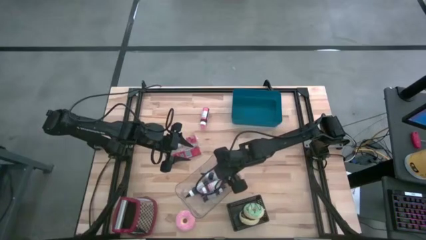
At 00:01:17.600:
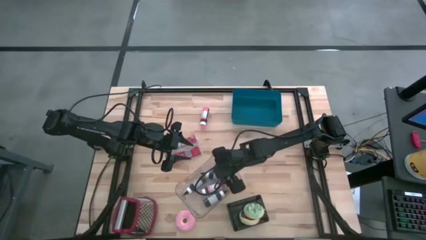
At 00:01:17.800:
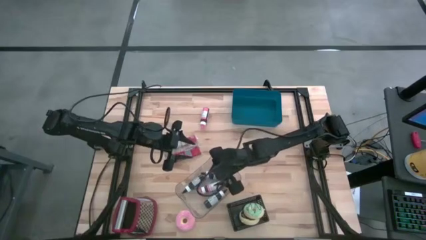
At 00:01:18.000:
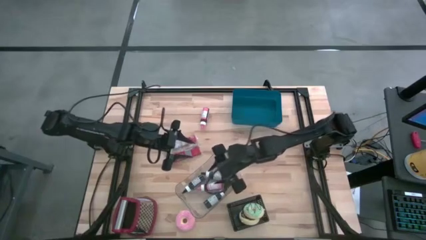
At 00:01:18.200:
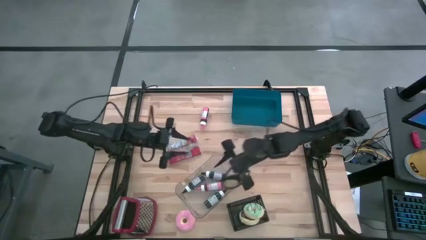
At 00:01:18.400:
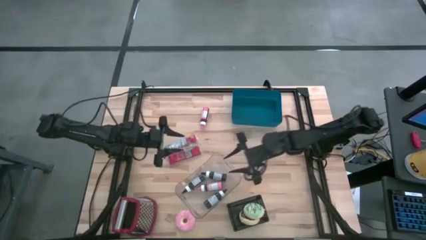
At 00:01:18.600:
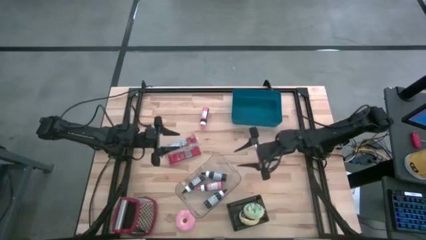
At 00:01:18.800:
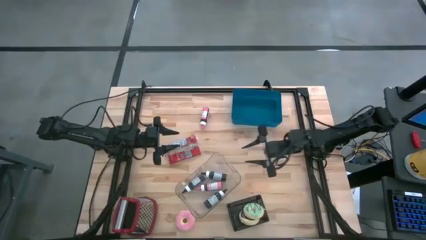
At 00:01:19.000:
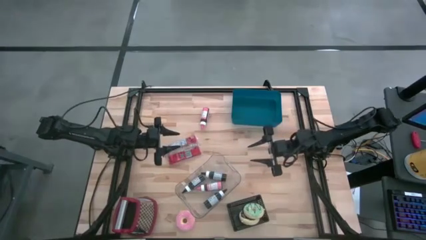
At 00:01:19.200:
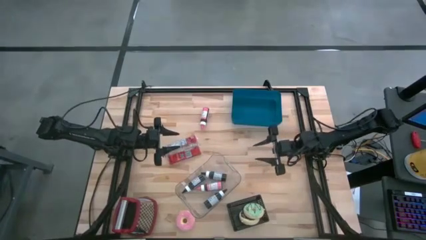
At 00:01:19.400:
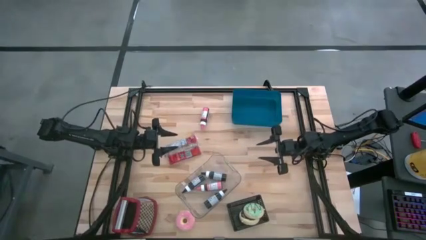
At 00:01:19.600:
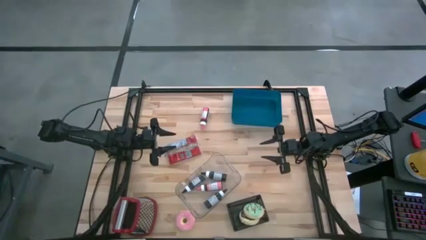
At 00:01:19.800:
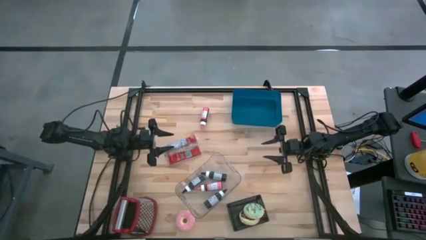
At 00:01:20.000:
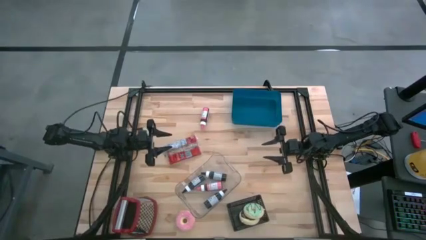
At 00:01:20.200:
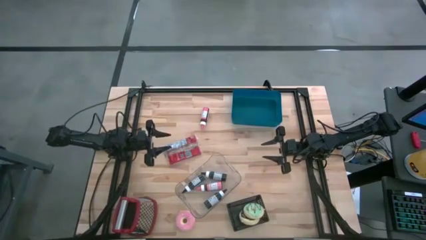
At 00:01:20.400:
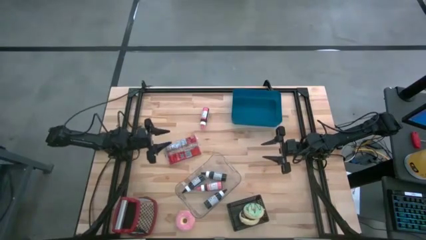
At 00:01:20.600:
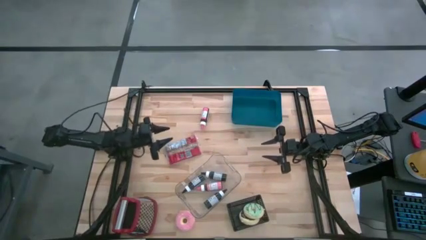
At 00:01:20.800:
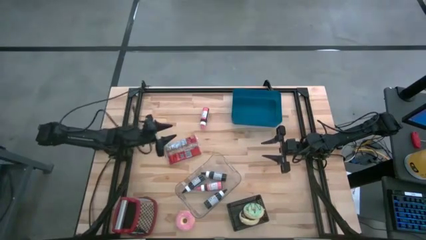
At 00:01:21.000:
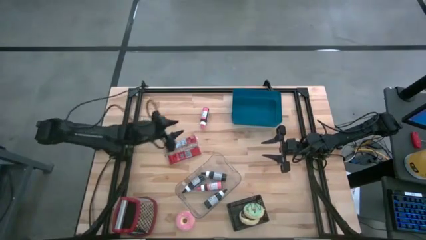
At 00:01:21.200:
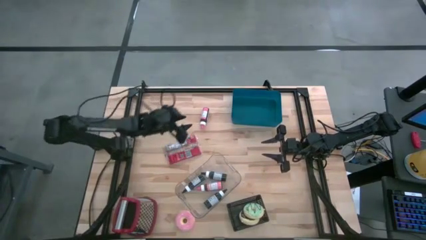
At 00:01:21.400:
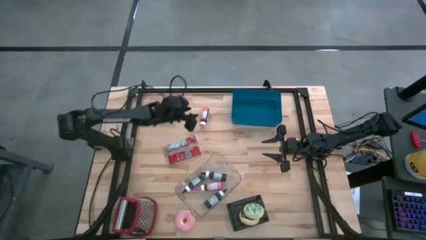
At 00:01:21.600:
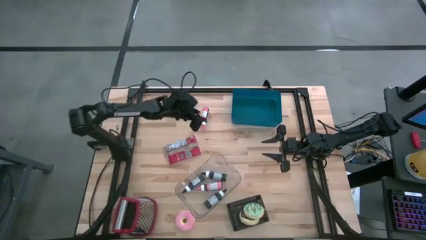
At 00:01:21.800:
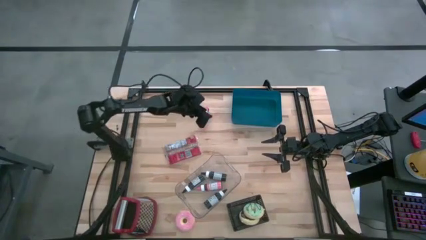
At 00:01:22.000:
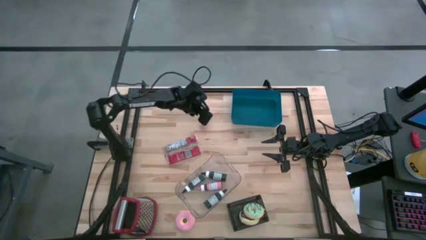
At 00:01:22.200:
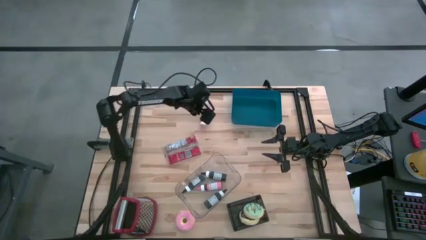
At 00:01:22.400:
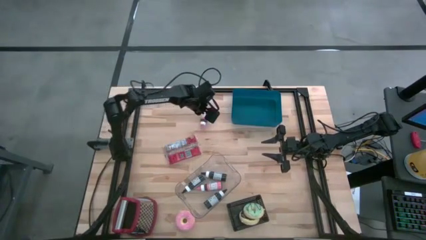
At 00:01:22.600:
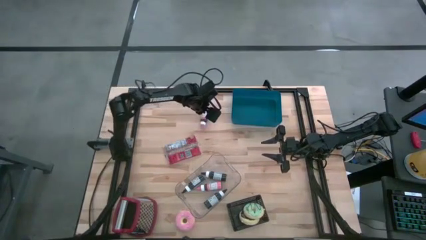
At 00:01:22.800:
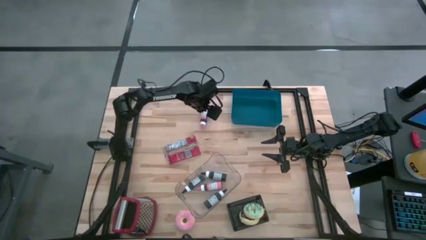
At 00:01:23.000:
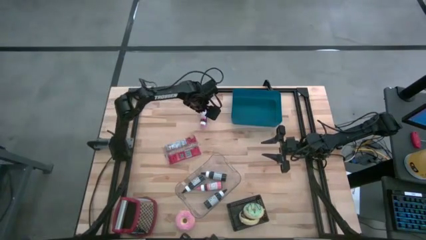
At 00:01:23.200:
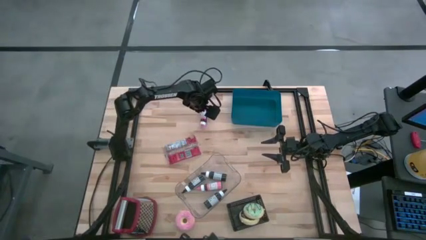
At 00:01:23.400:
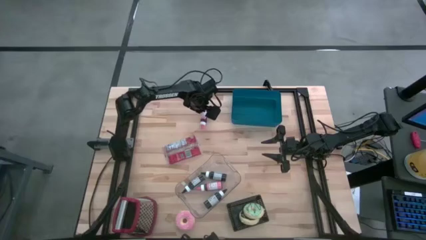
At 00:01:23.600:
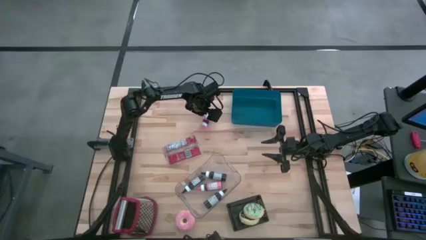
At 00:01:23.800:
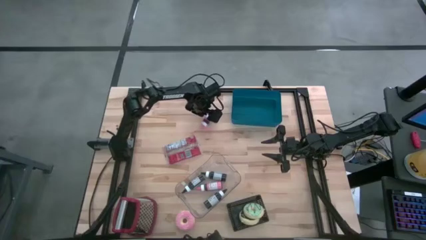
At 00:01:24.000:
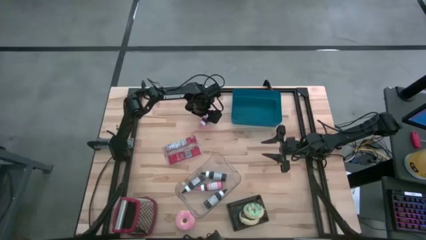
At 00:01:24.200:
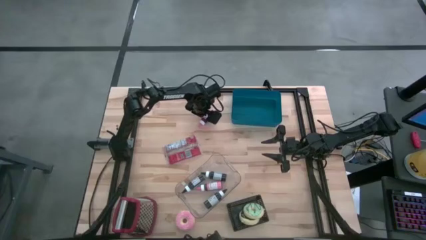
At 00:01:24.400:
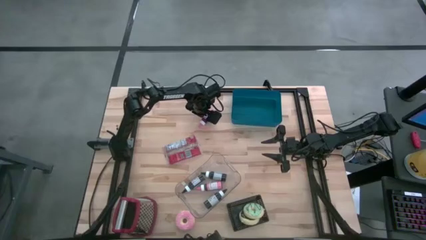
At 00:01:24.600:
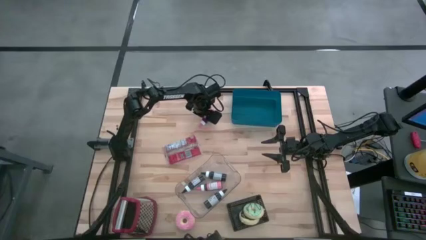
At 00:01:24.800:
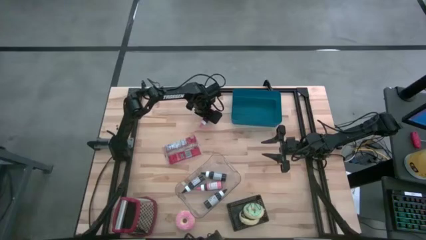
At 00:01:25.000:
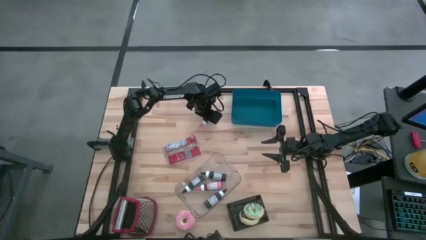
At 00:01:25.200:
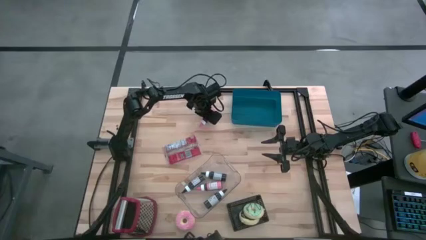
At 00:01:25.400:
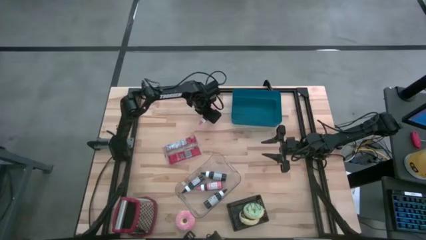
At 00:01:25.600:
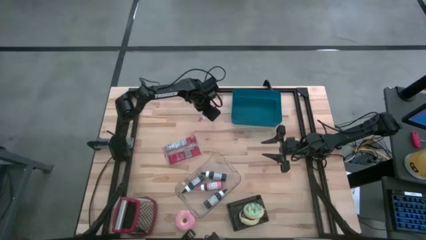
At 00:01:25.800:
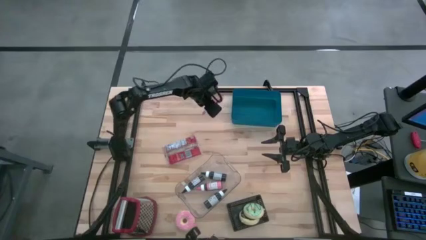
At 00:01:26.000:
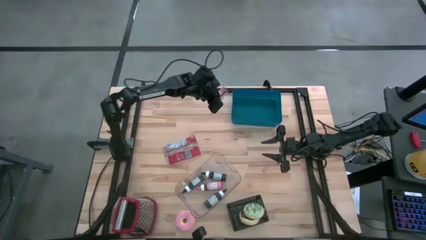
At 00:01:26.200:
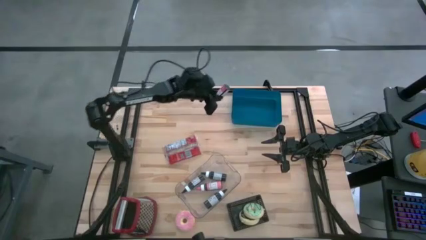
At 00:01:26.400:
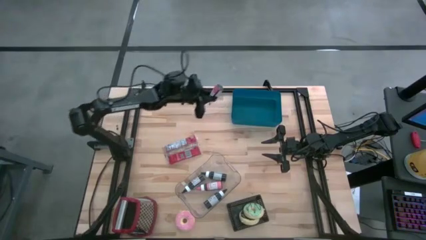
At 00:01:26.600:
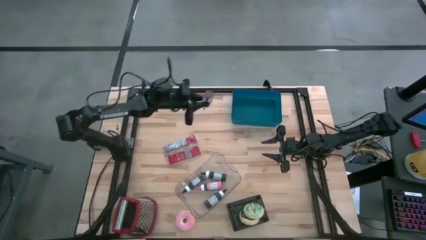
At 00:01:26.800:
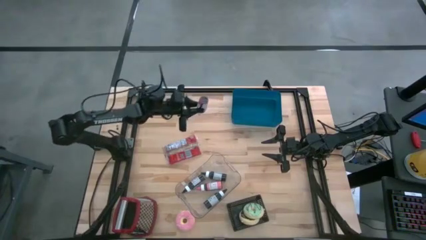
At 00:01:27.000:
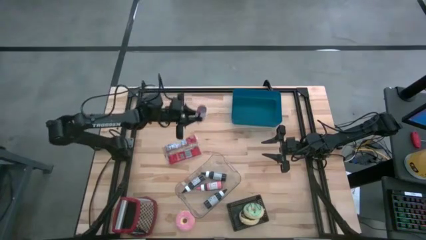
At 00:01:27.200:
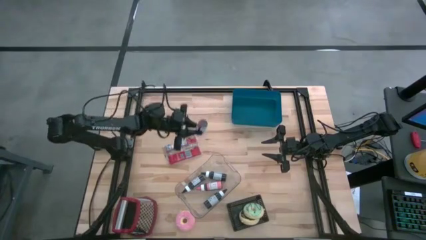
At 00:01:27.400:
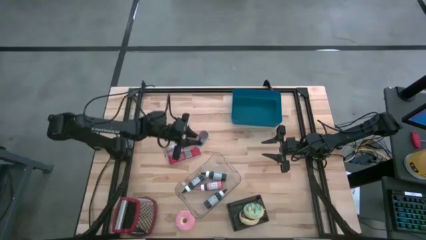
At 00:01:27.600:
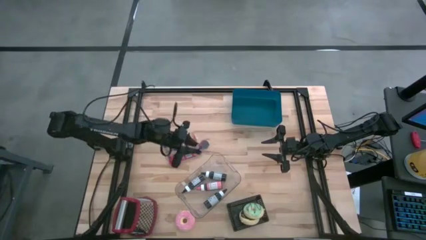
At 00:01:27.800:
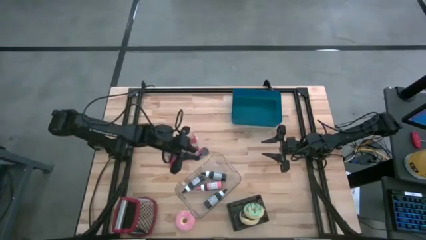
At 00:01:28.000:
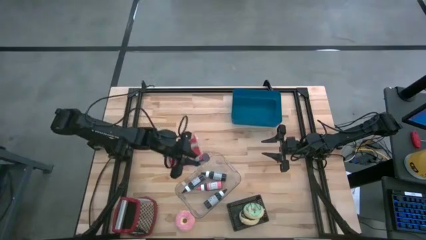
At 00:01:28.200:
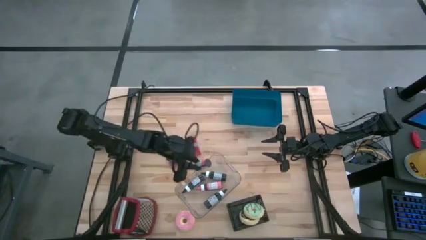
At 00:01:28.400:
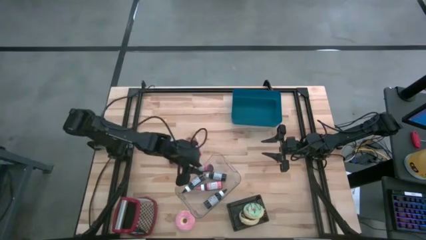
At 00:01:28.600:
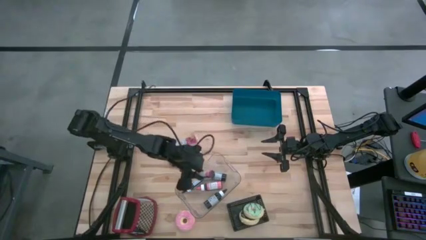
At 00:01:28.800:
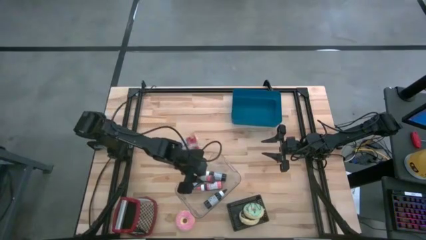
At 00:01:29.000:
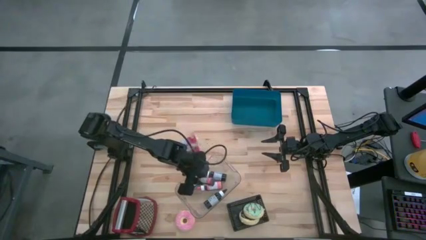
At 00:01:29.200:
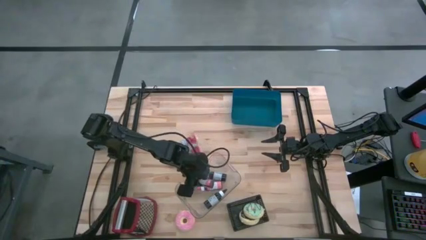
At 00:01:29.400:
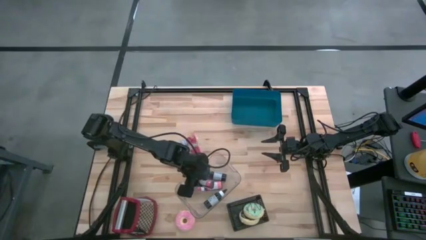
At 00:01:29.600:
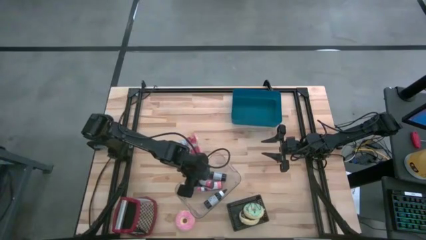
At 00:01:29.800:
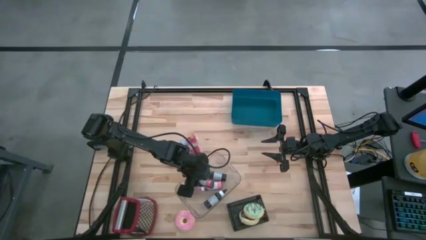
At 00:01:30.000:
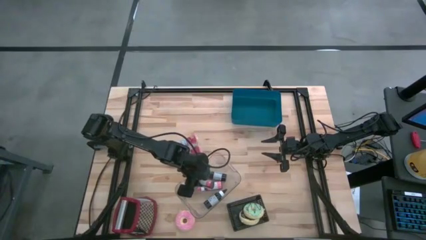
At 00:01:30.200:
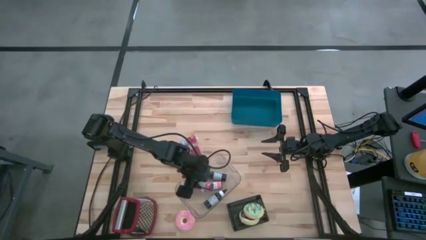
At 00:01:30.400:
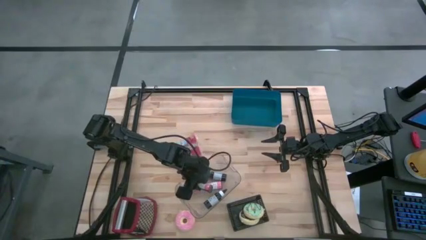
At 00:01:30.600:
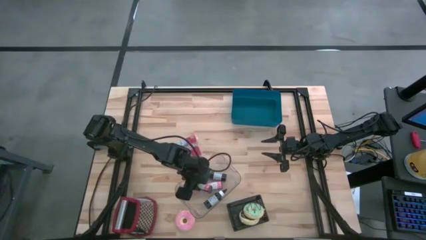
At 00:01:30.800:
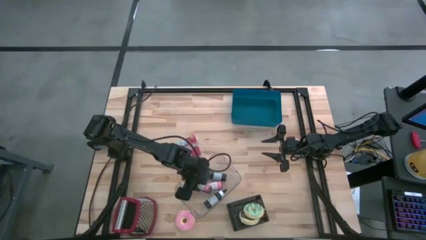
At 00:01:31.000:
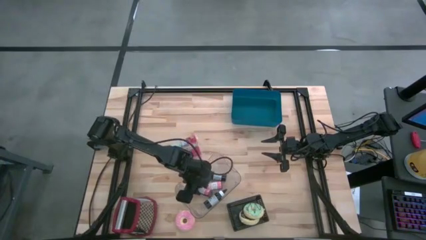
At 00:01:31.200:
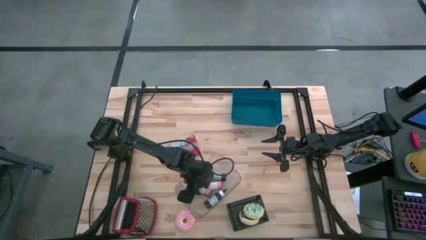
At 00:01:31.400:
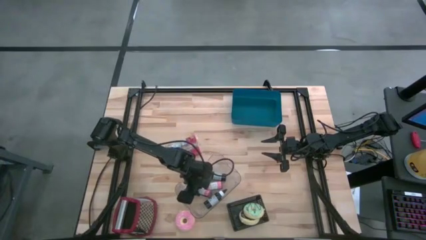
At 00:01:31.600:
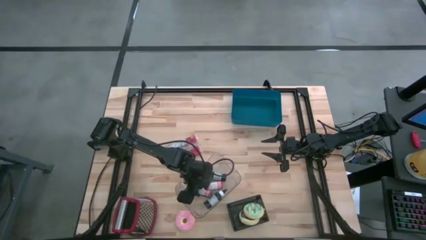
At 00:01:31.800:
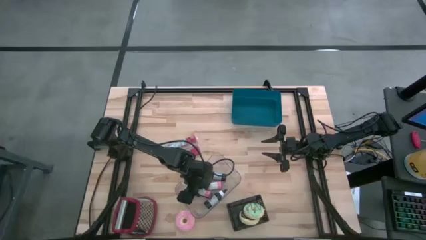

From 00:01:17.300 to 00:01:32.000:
Put the pink food coloring bottle into the transparent bin
